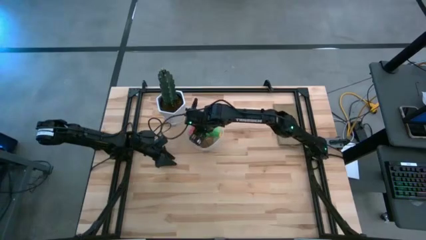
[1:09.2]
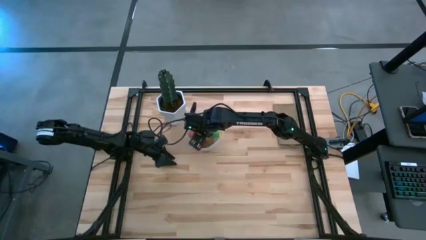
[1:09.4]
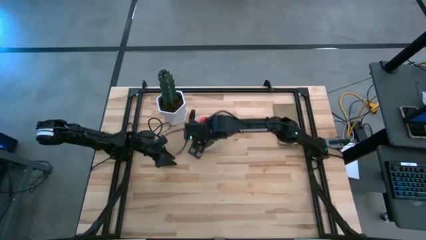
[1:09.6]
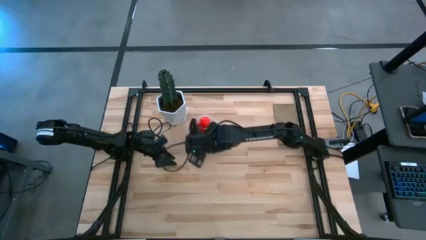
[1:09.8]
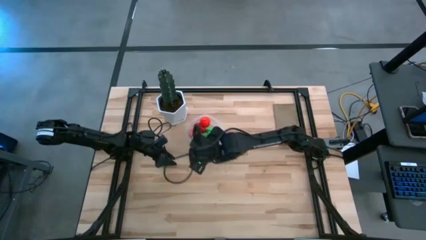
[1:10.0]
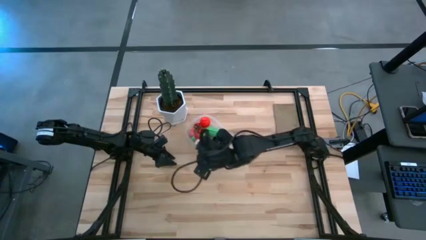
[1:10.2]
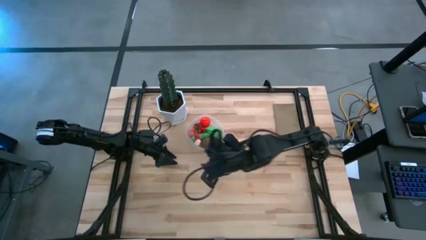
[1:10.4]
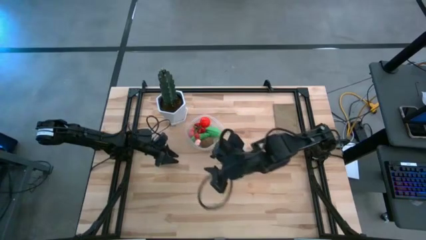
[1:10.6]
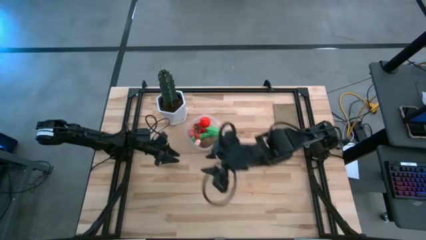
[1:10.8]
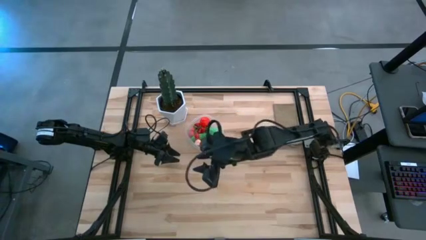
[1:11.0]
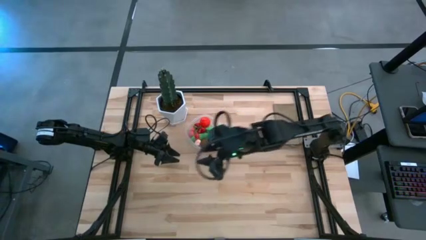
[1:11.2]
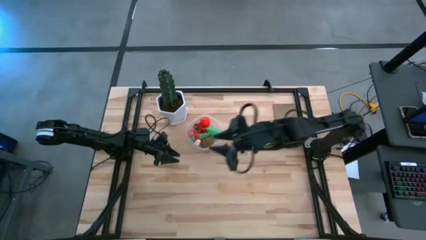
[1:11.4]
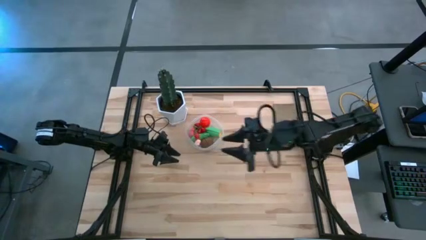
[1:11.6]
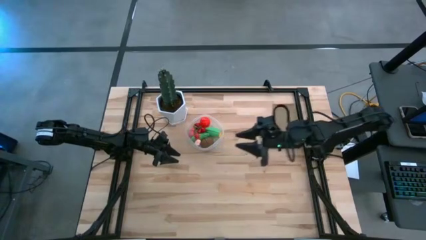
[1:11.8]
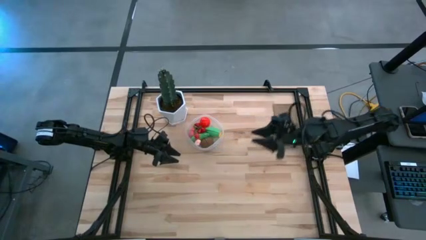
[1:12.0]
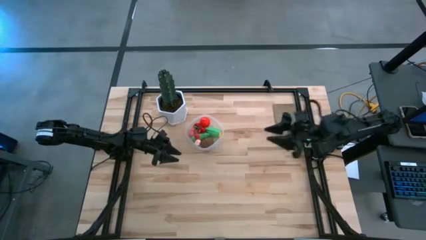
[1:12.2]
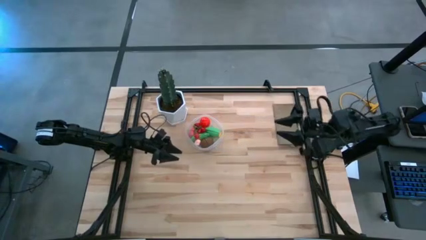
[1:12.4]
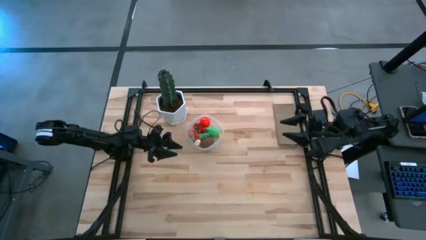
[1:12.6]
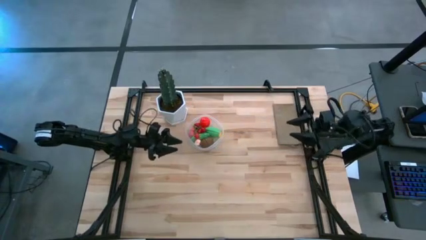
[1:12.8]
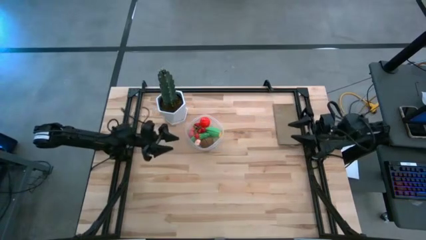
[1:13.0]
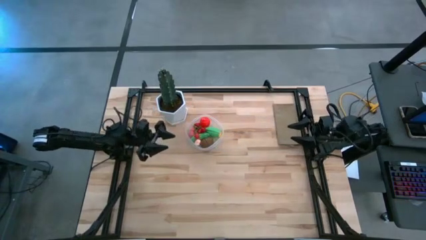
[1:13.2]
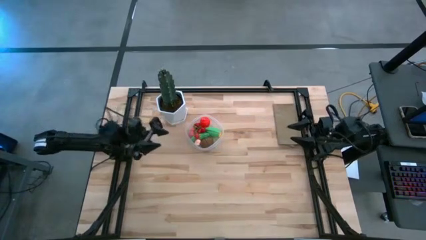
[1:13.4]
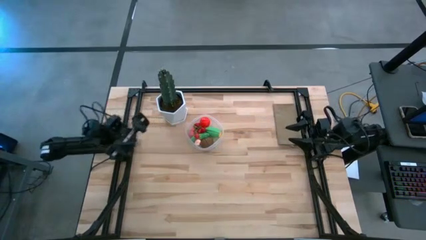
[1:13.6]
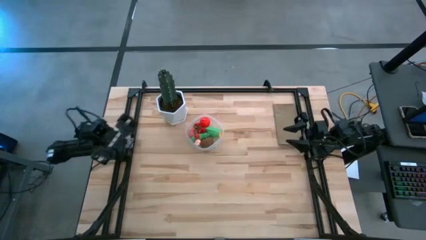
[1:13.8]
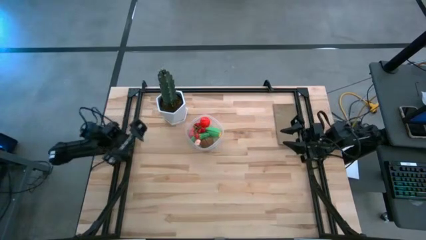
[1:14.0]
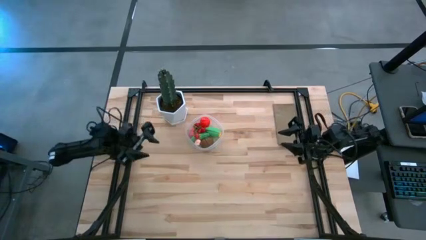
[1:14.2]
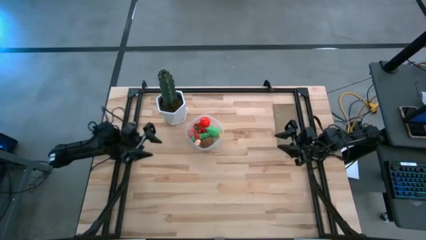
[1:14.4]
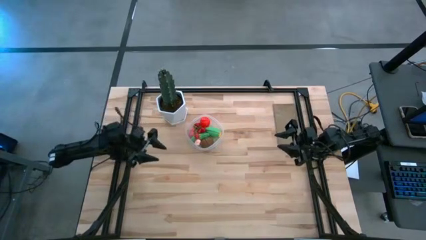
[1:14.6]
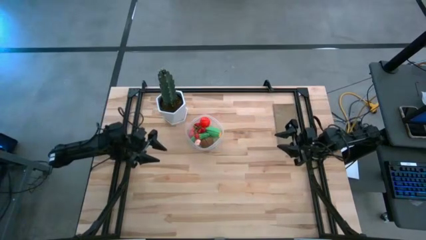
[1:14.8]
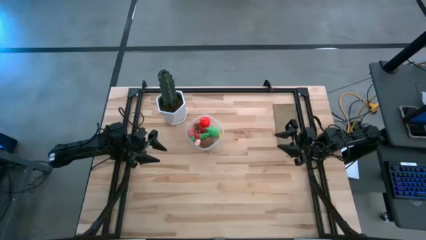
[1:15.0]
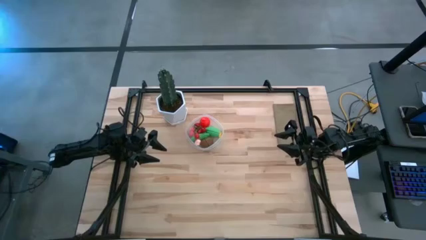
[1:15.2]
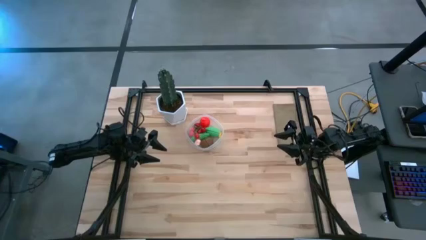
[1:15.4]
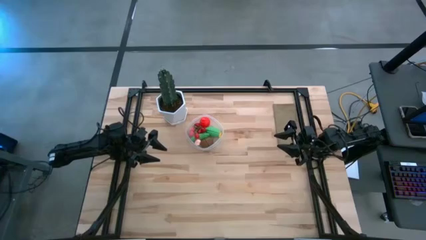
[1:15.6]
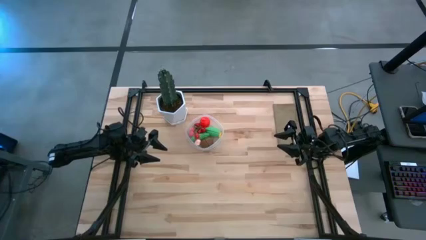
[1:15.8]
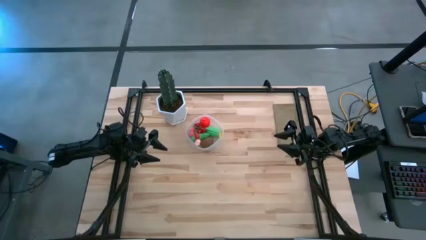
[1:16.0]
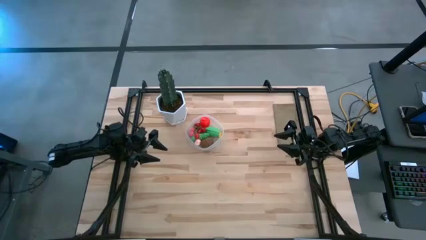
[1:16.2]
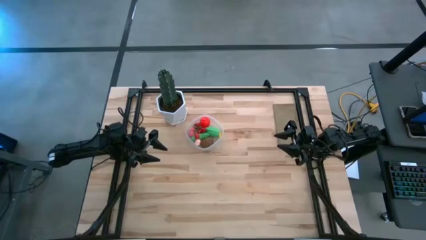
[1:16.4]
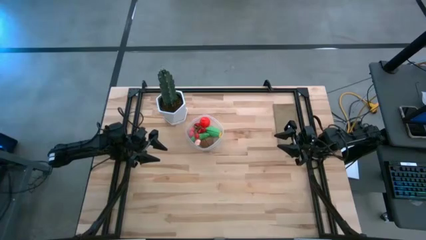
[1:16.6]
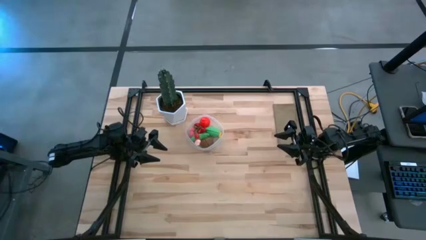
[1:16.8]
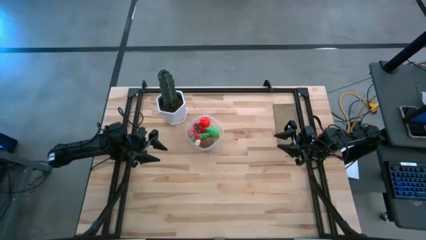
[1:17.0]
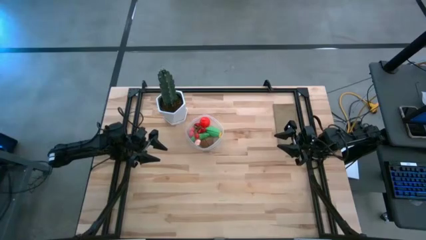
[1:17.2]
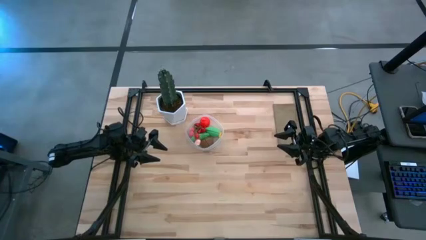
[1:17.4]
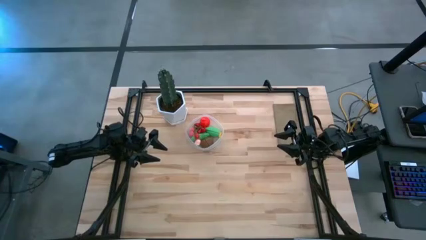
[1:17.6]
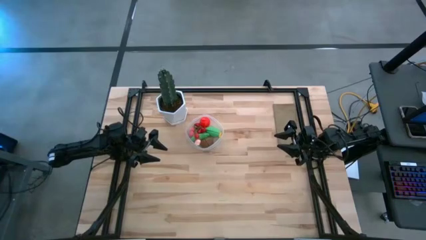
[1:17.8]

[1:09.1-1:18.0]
Task: Pick and placing Produce into tupperware
Return to Home Position

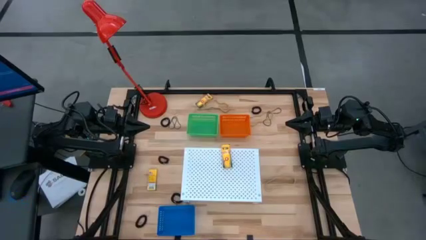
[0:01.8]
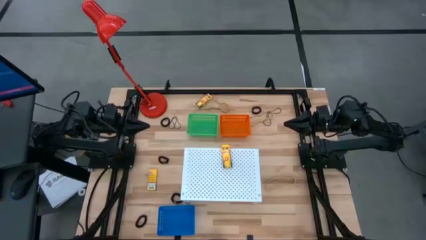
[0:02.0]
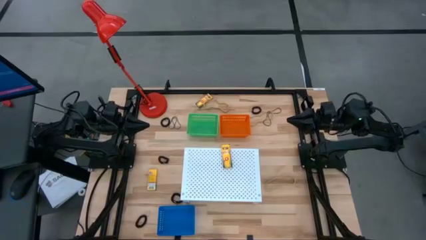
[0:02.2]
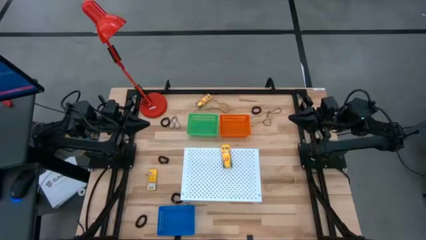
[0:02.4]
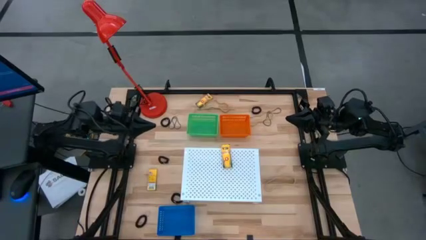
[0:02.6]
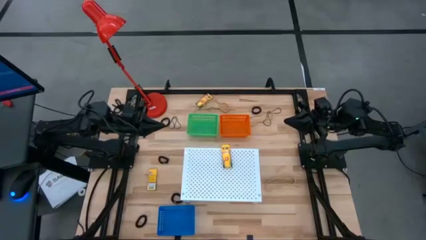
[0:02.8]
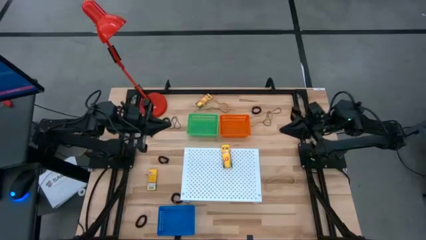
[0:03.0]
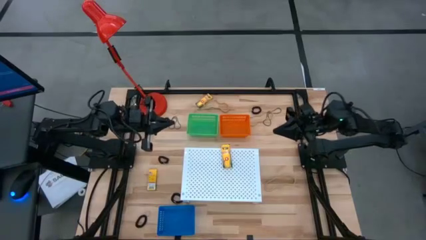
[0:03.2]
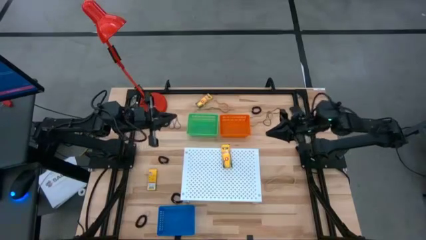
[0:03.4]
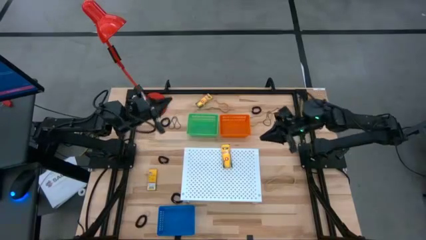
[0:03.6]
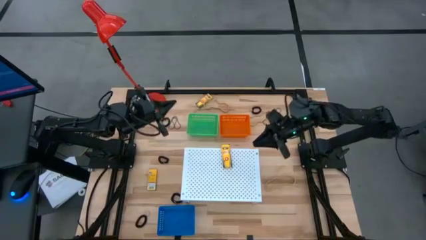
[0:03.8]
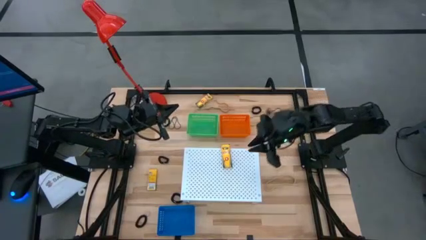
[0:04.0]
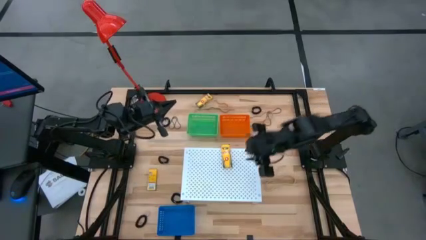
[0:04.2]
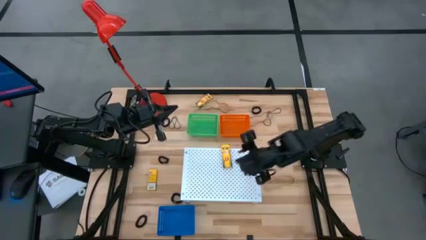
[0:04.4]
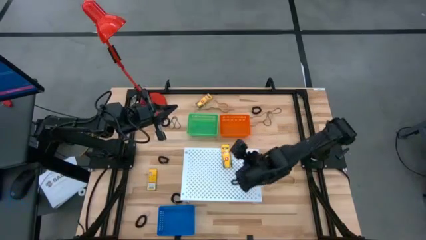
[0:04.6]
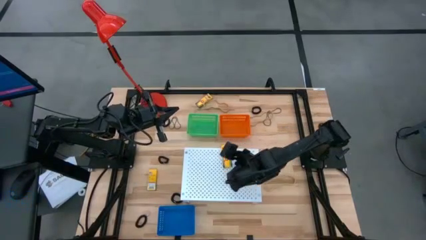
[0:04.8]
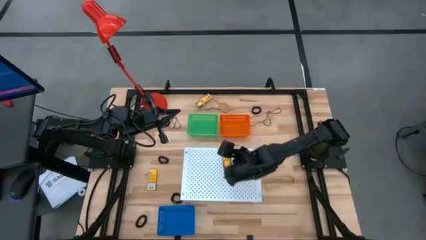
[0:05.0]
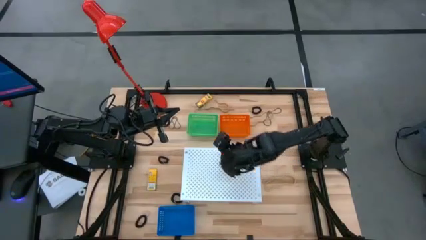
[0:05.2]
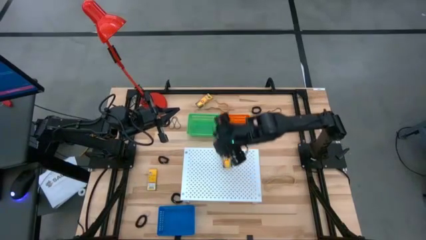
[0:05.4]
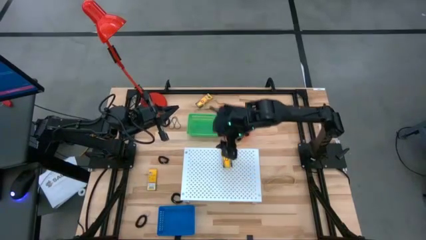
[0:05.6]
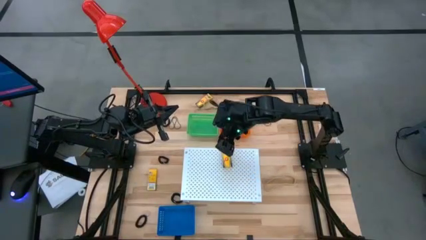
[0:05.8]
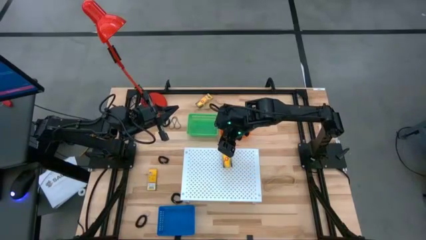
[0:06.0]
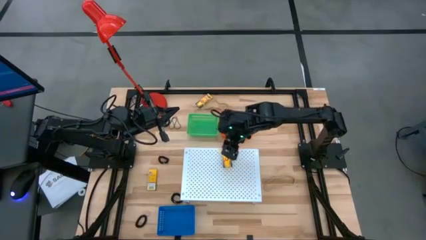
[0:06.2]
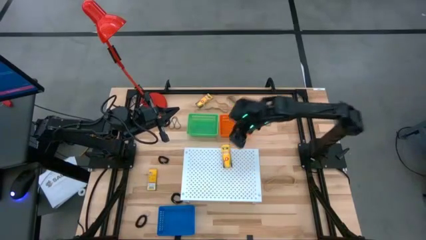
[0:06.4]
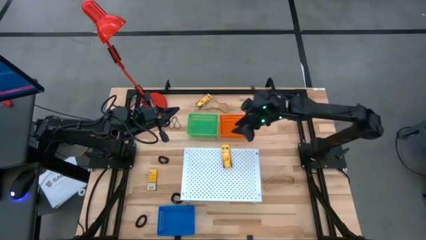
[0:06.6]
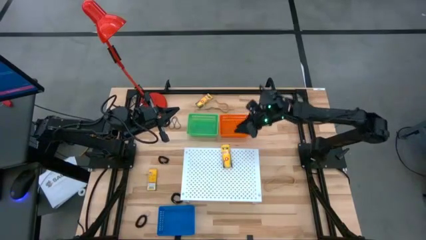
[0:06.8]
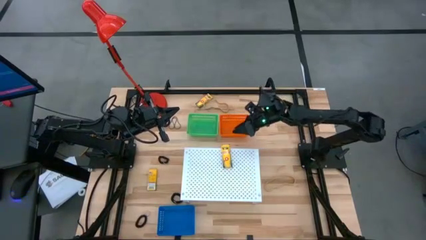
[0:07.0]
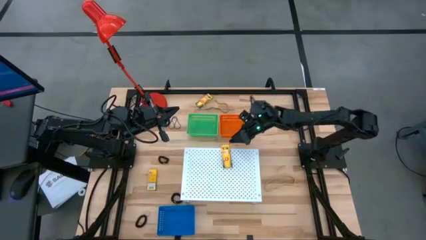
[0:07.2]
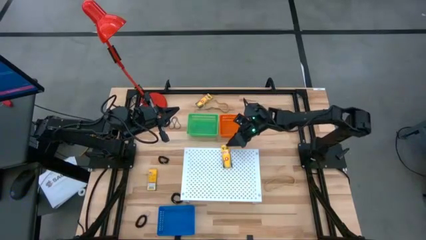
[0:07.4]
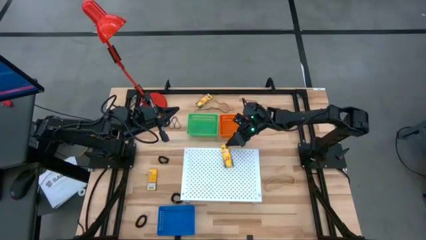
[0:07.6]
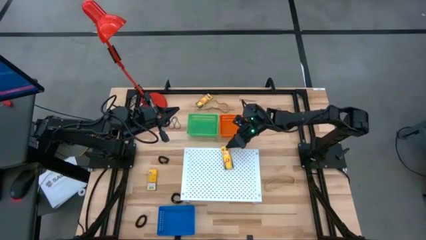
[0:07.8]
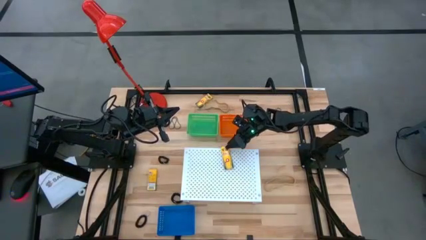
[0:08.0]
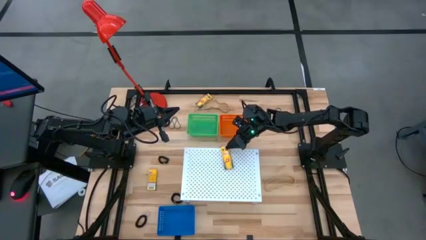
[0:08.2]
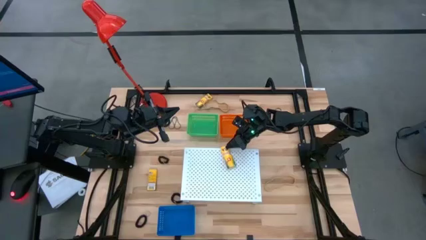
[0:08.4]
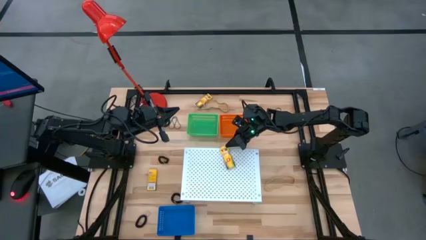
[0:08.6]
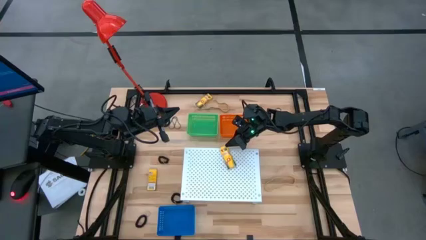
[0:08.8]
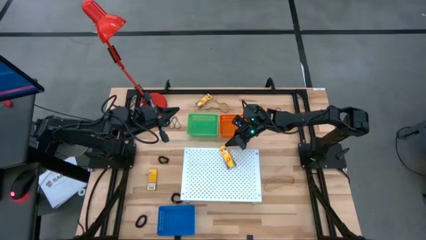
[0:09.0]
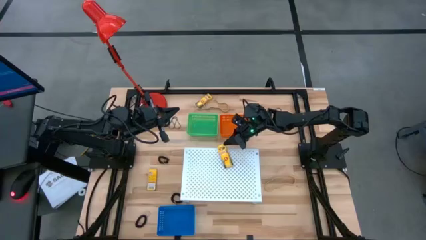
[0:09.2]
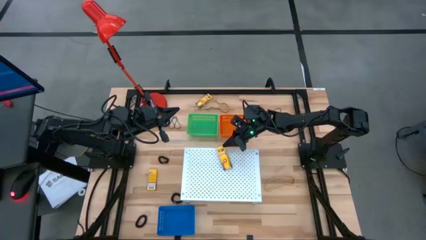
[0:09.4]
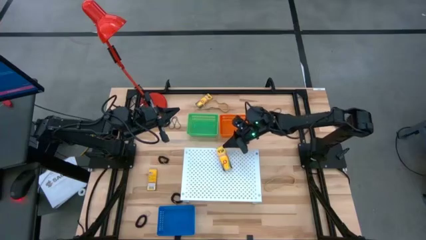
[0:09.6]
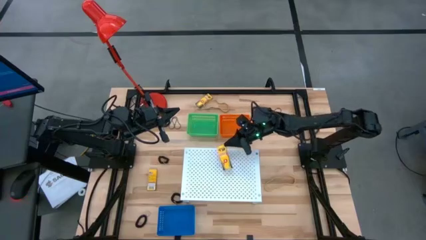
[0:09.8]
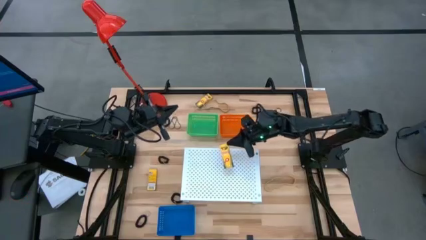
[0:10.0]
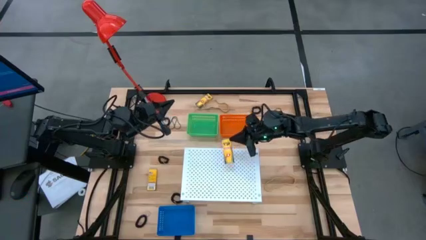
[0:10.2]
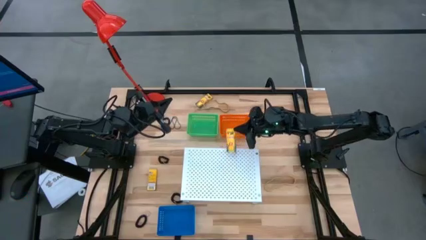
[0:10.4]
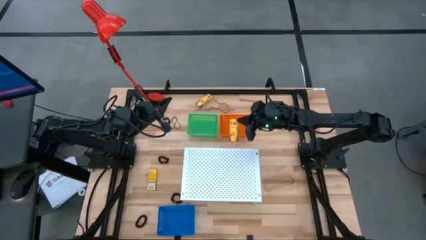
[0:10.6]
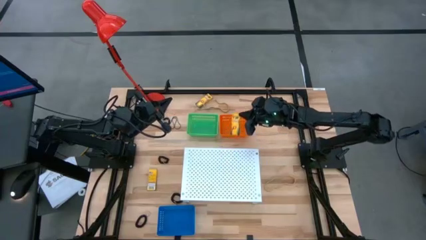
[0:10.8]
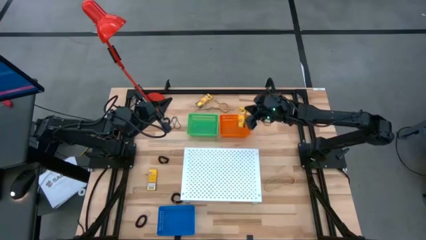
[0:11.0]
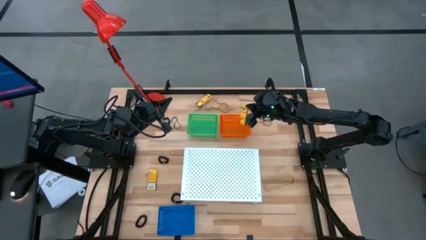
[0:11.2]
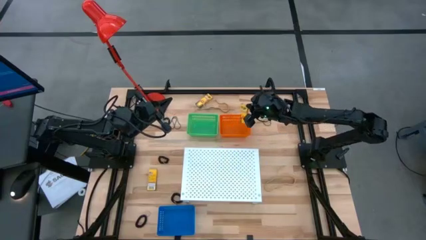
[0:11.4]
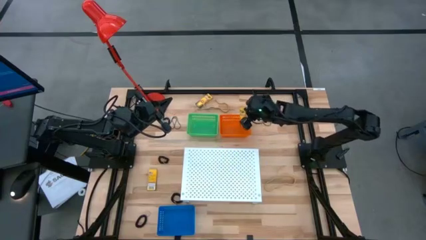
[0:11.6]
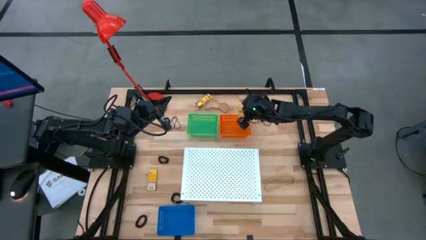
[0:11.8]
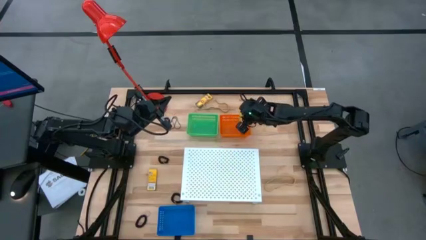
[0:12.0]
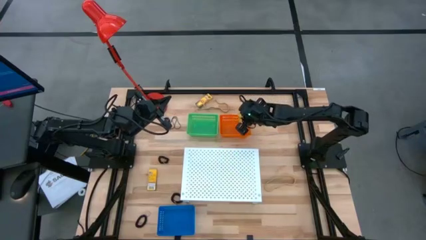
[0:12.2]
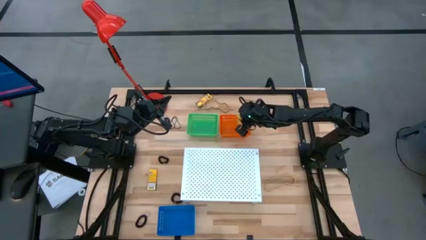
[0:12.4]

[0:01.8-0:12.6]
Task: Pick & Place Office Desk Supplies
Put the crayon box into the orange bin
